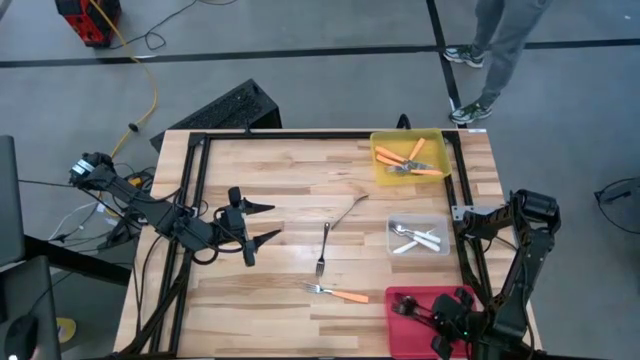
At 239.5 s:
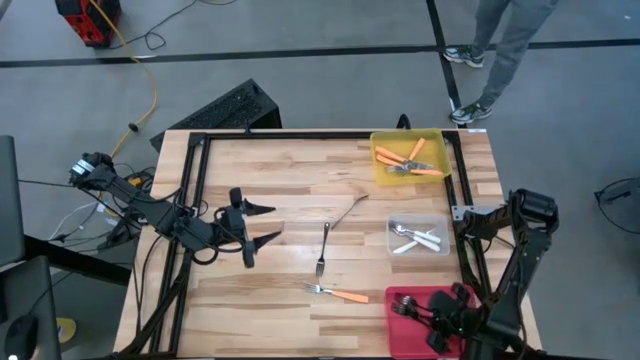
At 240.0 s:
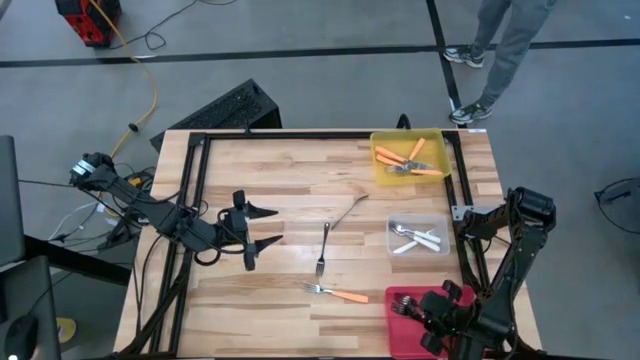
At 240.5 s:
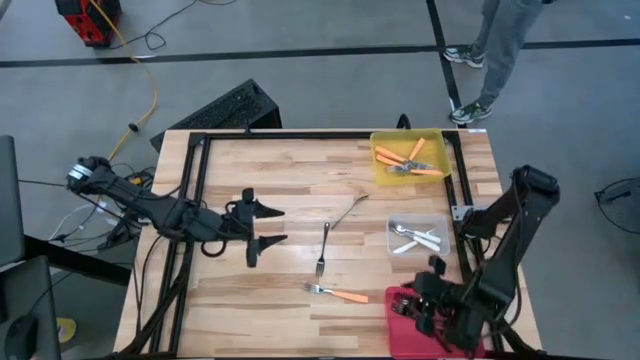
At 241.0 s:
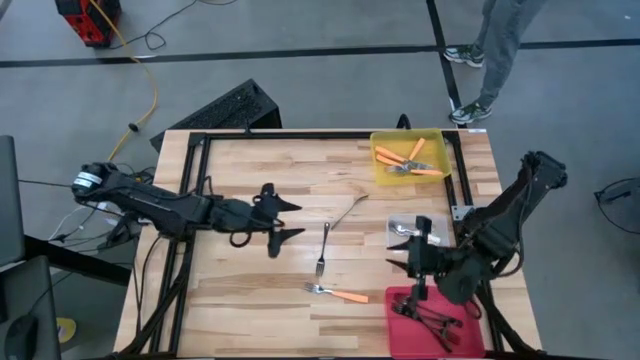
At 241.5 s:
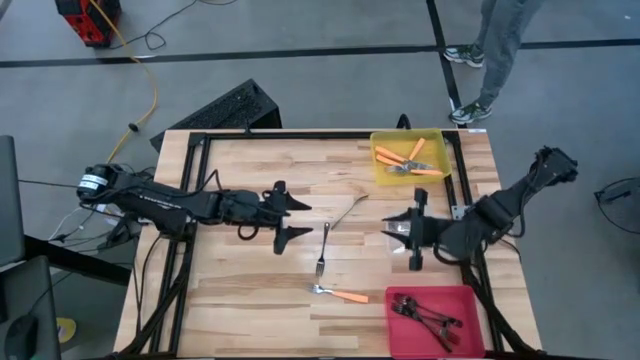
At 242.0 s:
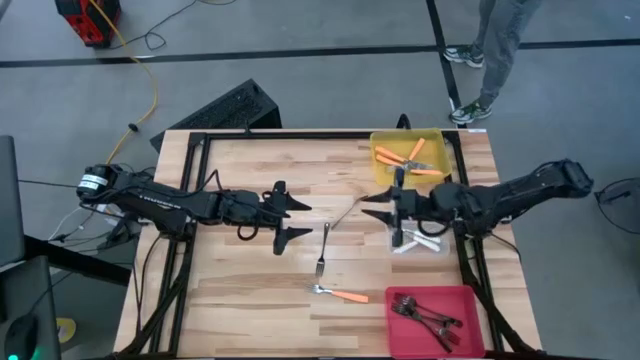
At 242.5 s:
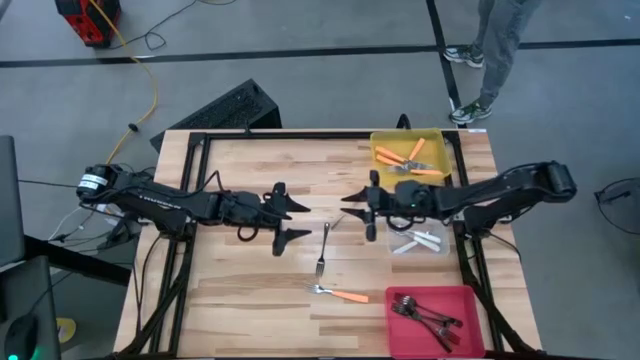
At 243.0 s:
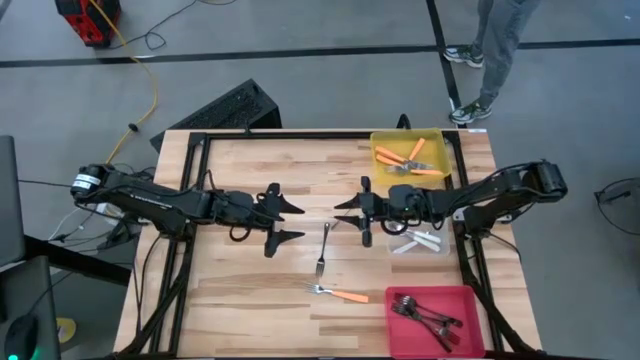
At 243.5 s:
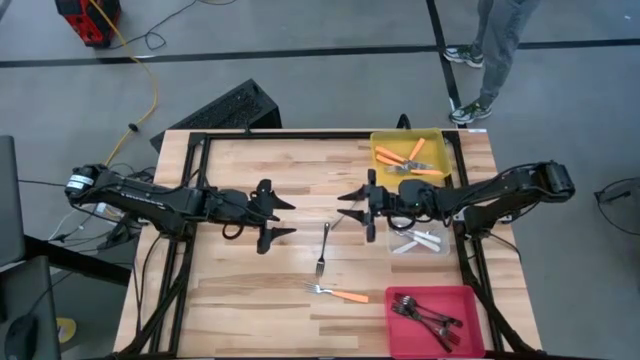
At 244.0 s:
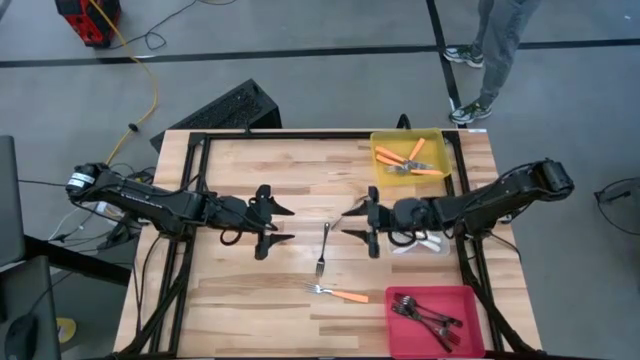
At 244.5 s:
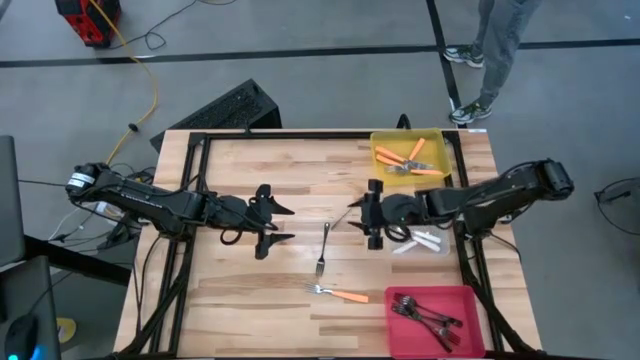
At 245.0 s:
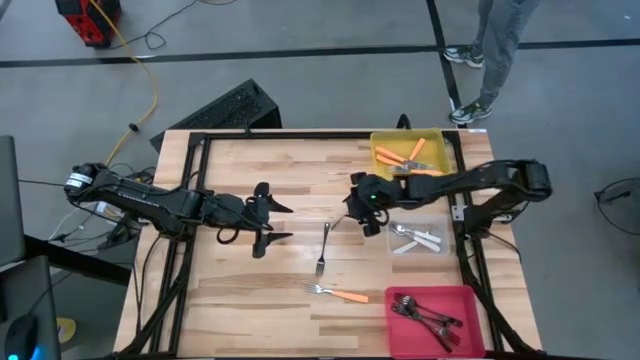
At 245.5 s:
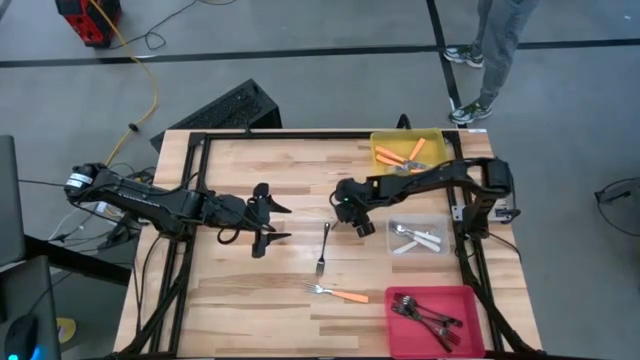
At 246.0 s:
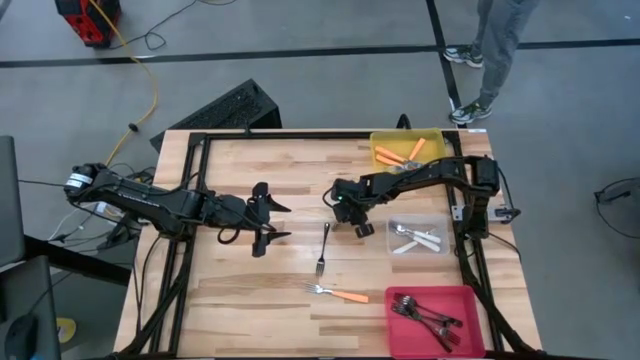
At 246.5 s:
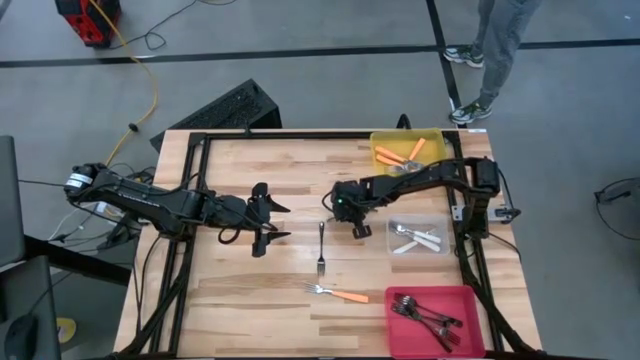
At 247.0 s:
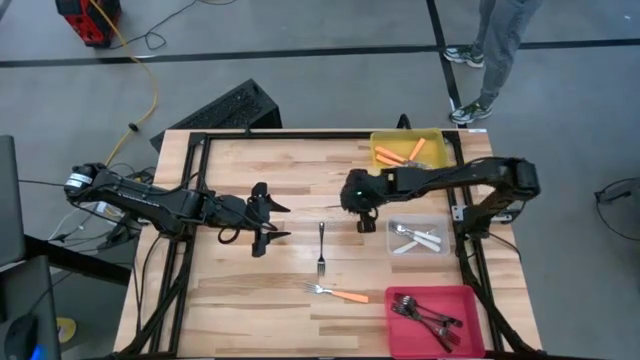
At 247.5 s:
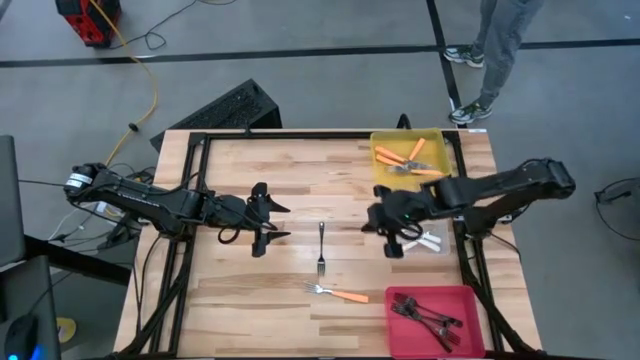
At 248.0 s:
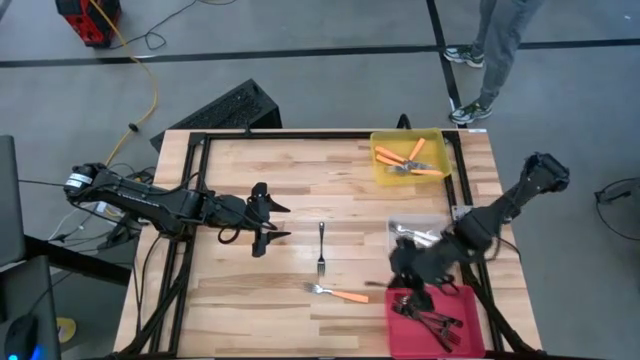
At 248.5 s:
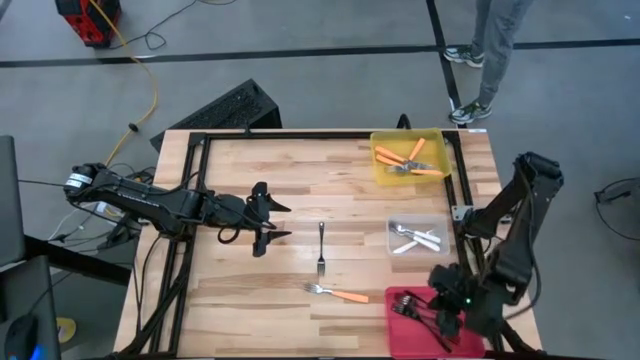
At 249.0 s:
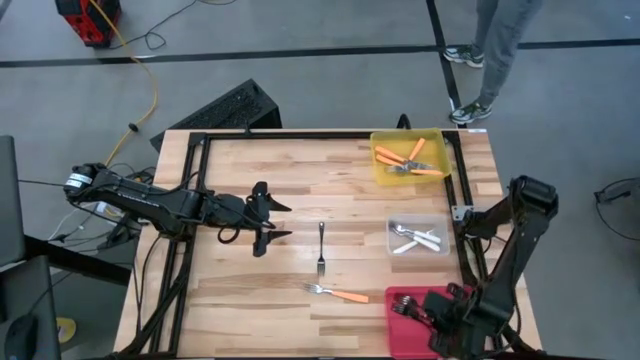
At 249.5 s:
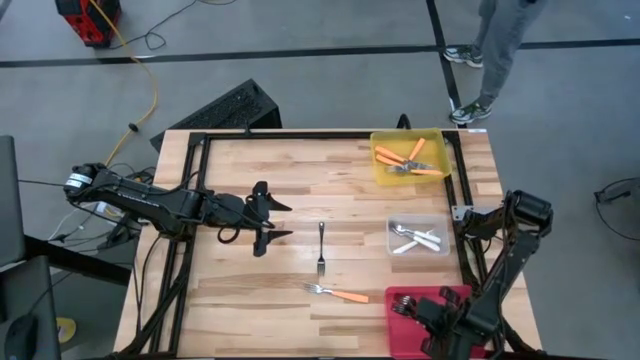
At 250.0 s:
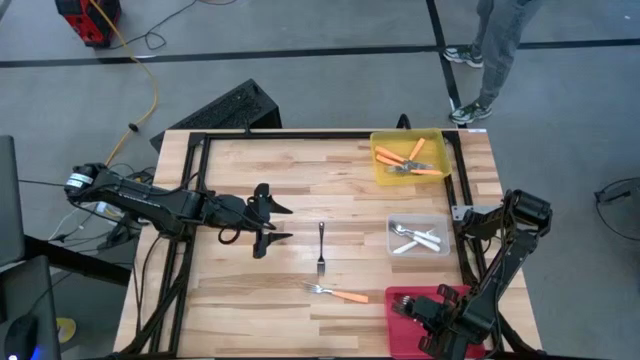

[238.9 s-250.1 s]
Task: Sort silverware by color (type)
Put the black fork into the red bin

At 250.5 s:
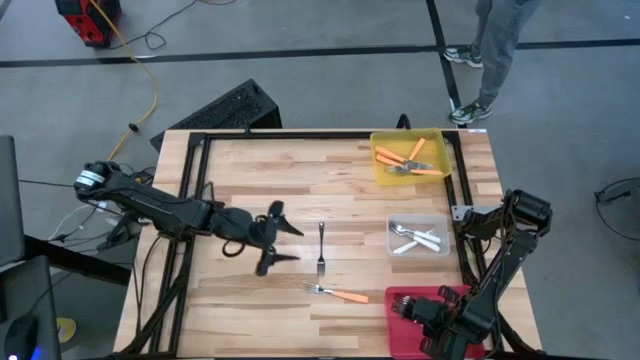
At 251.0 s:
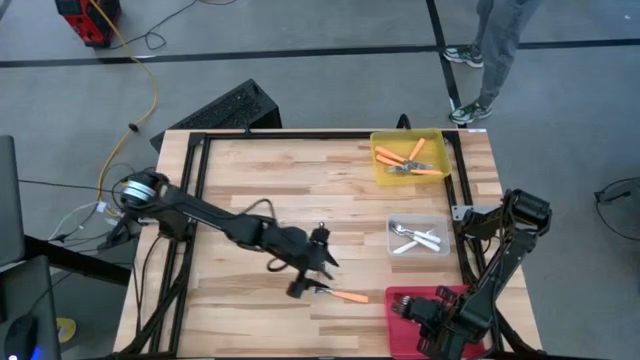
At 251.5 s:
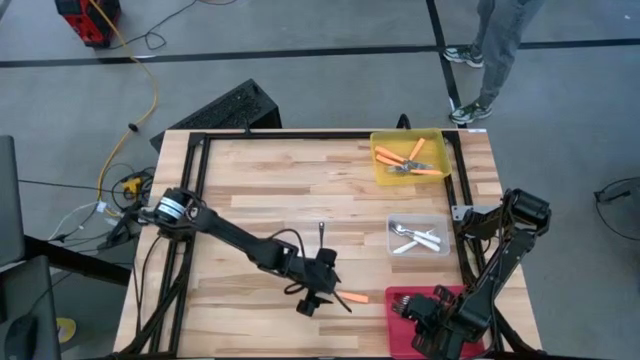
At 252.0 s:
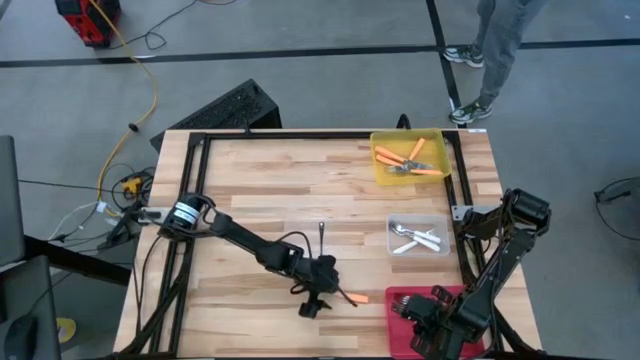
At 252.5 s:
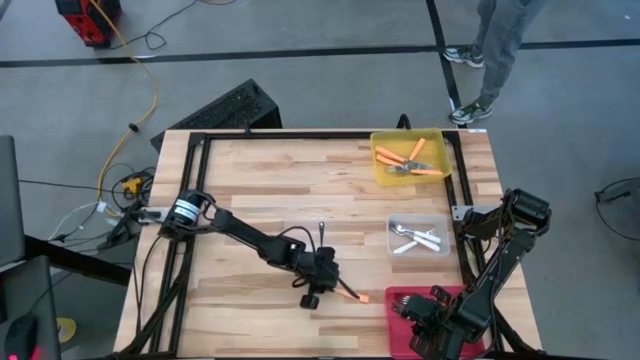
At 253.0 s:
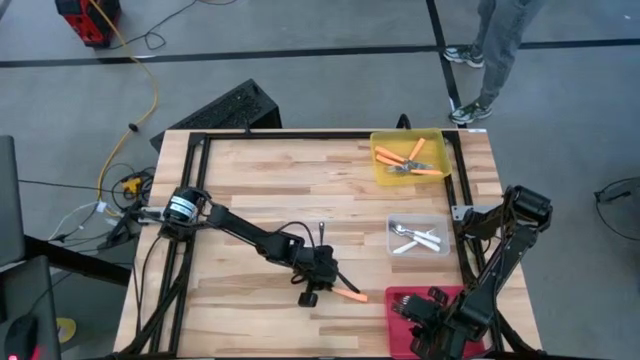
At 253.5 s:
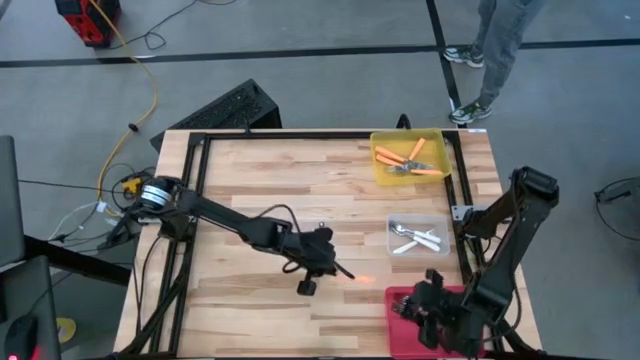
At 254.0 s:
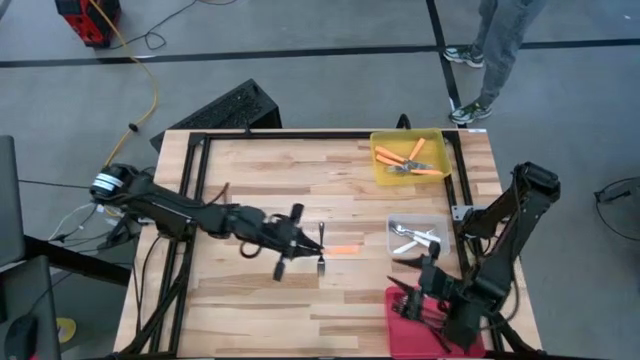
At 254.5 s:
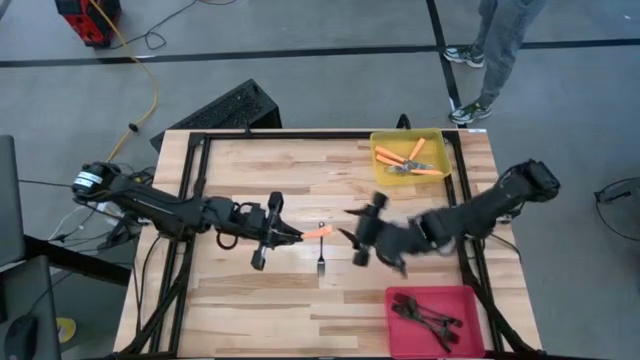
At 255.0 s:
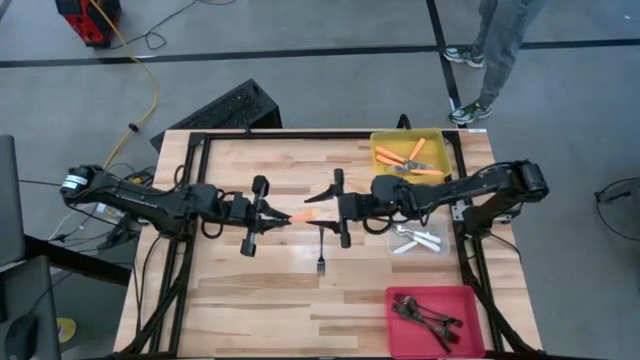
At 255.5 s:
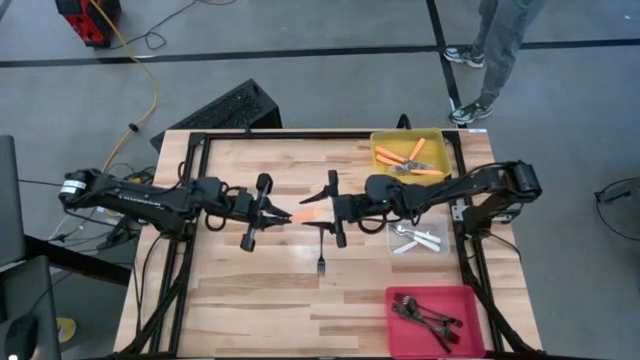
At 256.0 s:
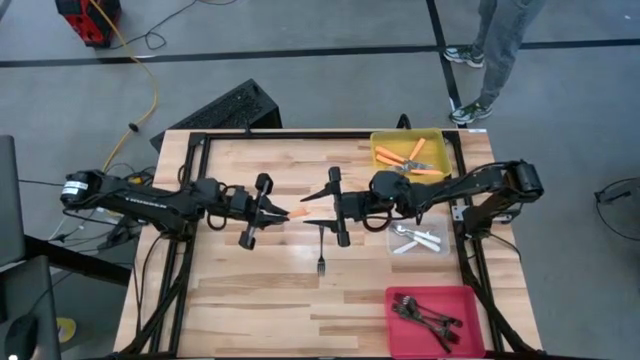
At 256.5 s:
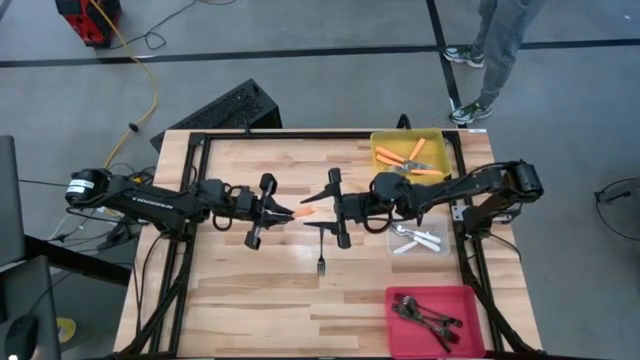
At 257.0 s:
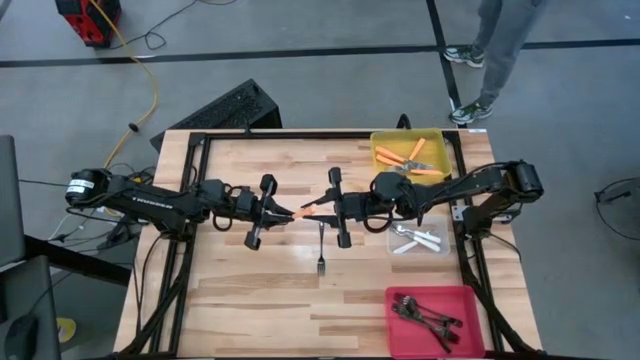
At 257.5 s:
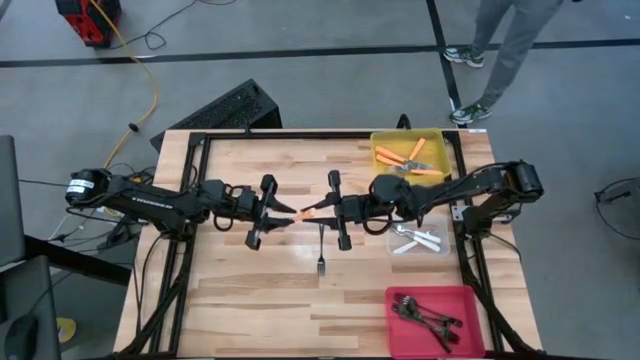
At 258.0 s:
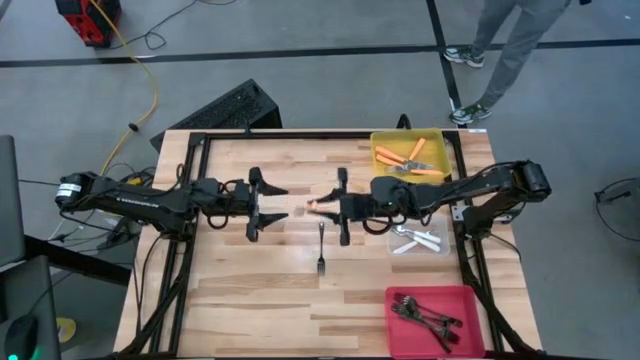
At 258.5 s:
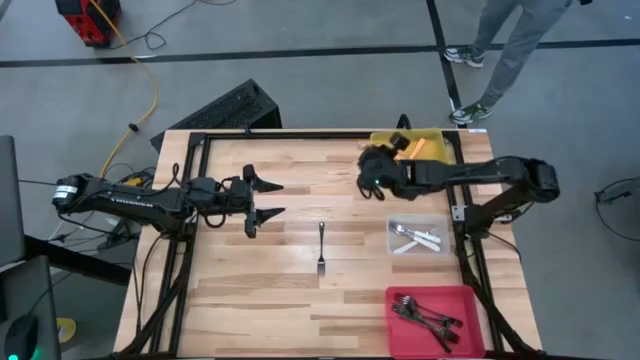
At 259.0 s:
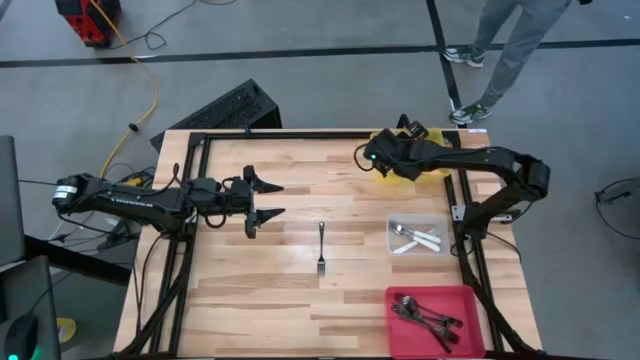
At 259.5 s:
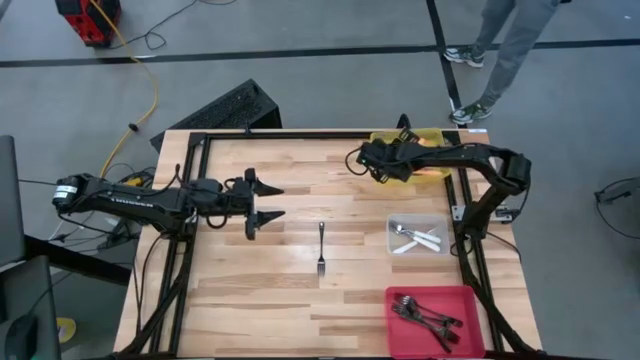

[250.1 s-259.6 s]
Put the orange fork into the yellow bin
